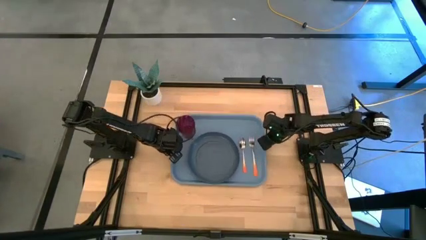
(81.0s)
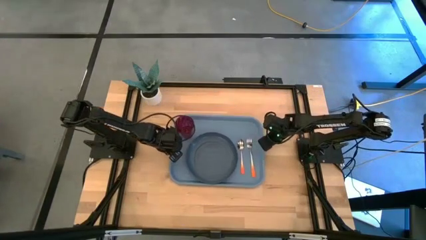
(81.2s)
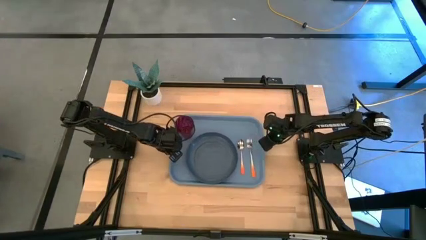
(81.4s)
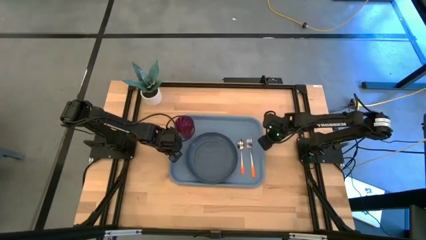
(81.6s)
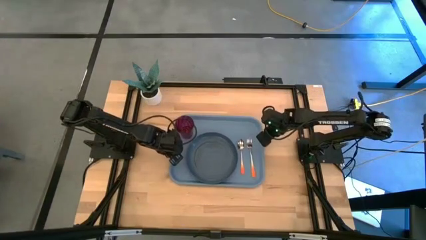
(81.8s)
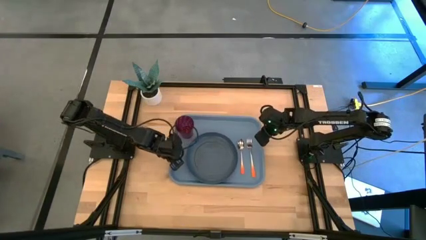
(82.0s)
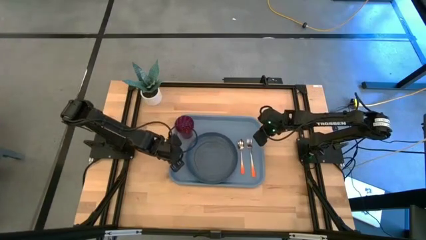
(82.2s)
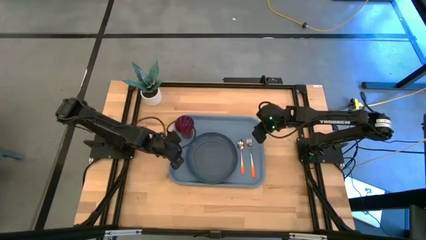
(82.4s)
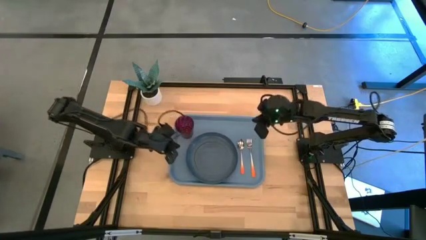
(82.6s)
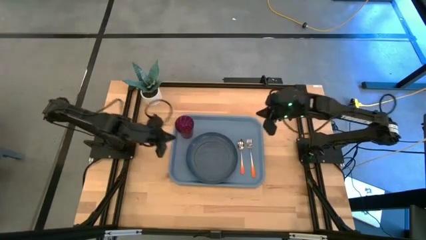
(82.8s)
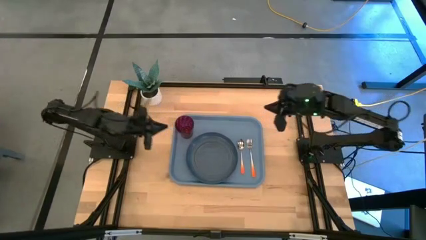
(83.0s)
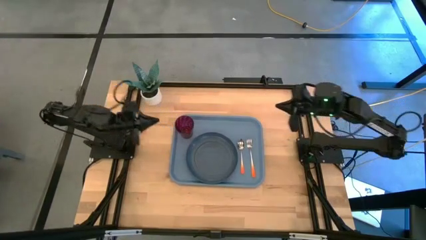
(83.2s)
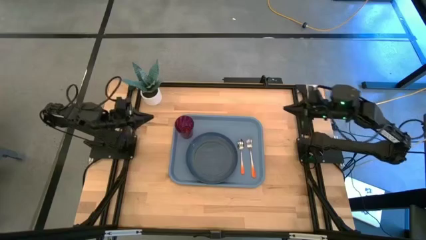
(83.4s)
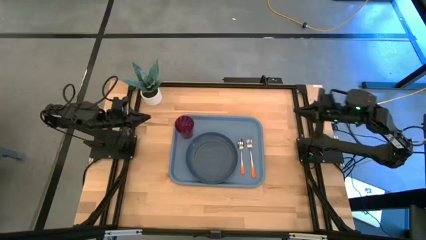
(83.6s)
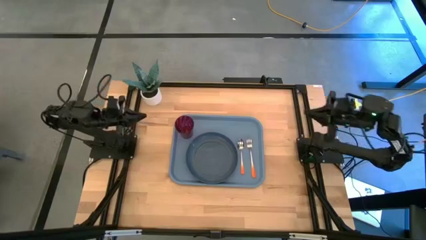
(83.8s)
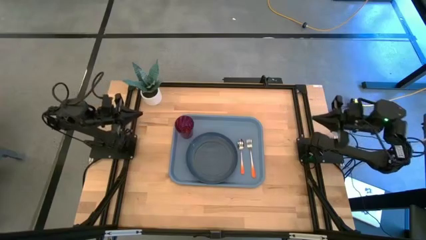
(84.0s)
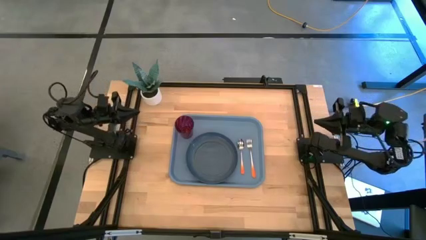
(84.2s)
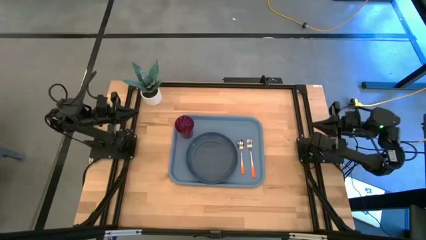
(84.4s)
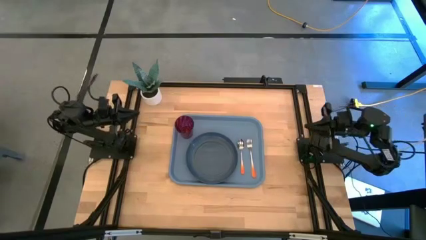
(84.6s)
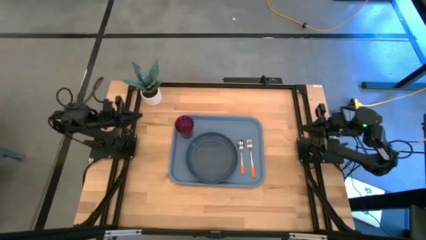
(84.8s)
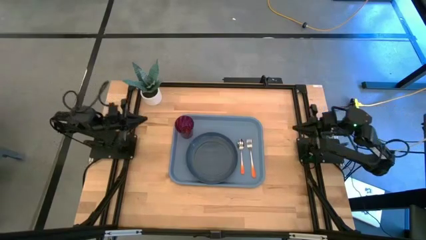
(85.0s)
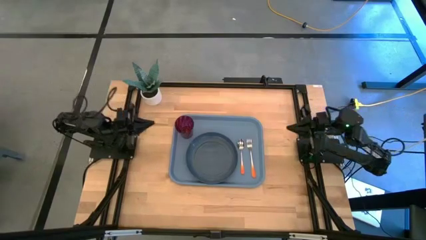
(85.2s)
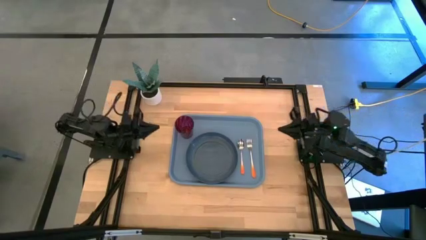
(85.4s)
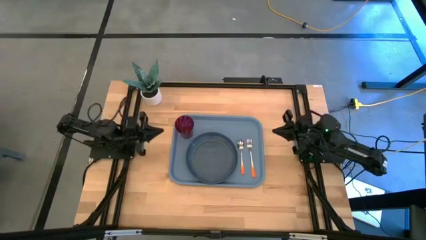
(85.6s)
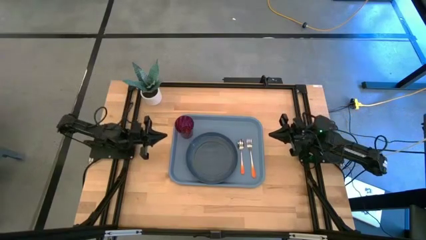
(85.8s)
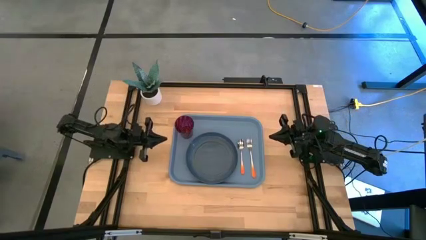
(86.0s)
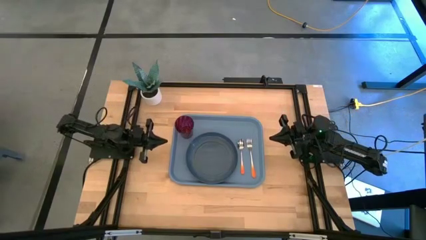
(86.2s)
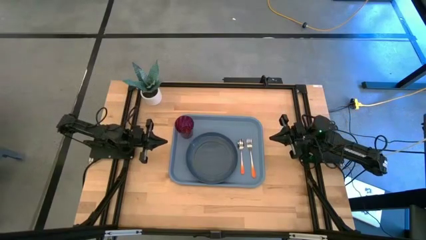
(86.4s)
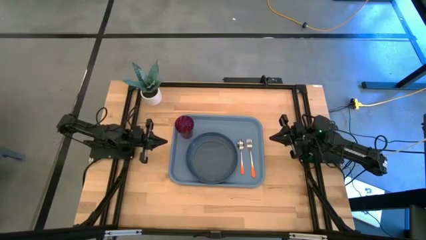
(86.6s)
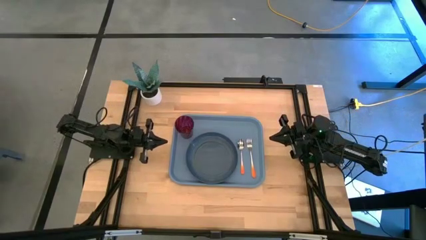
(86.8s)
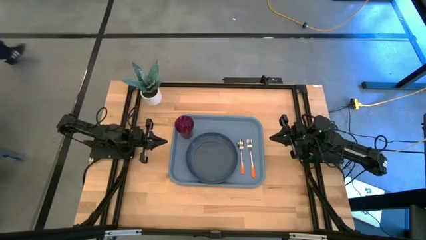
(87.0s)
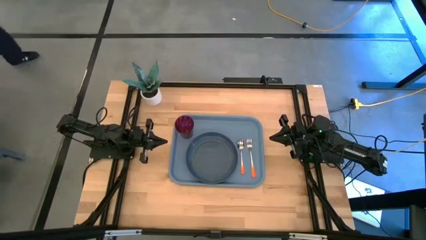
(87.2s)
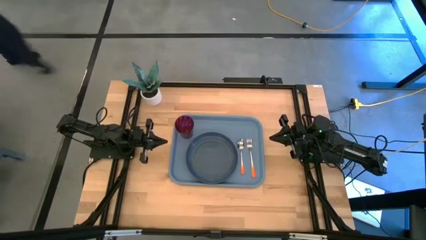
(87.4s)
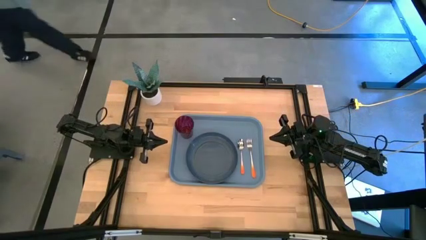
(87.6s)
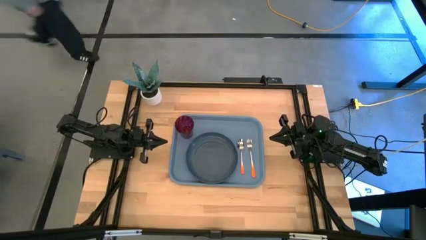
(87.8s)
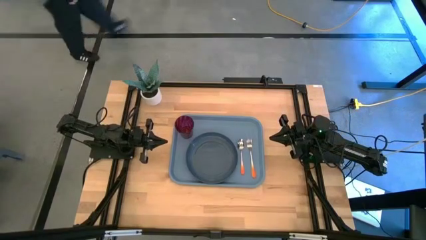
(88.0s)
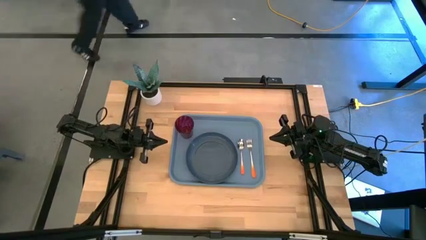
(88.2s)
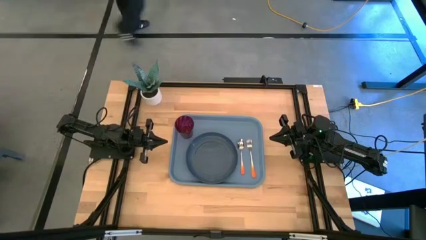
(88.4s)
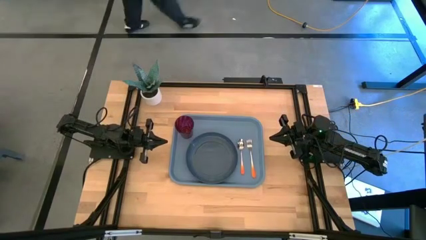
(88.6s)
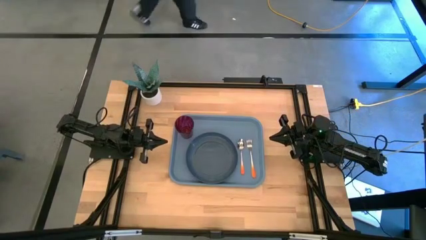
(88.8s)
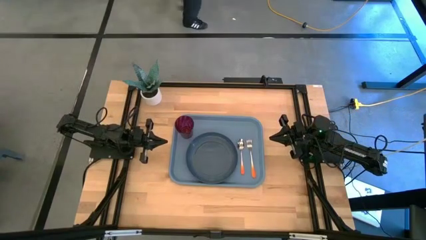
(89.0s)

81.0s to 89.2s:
Task: Pick and place plate/cup/fork/spoon on tray
Return to Home Position

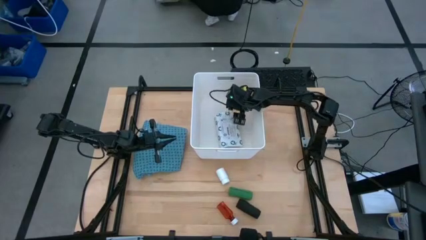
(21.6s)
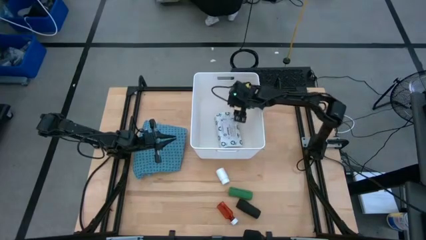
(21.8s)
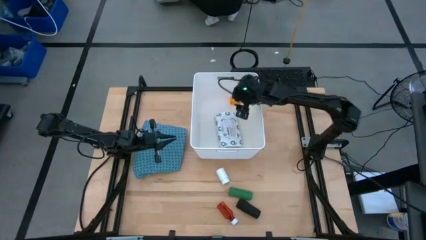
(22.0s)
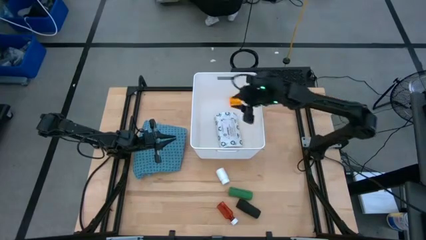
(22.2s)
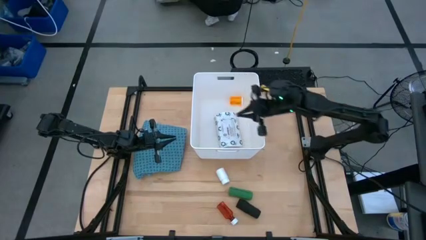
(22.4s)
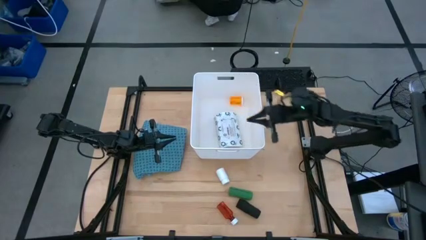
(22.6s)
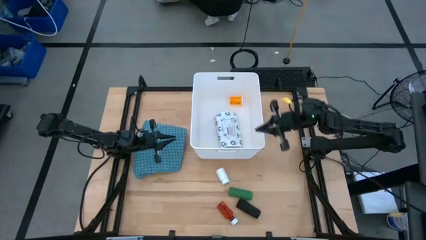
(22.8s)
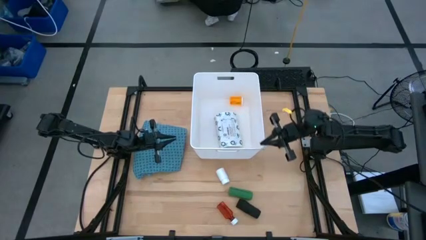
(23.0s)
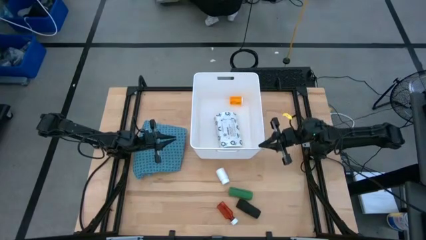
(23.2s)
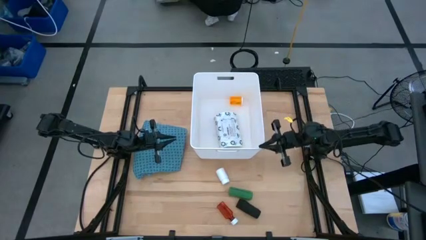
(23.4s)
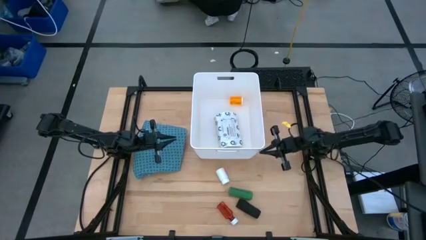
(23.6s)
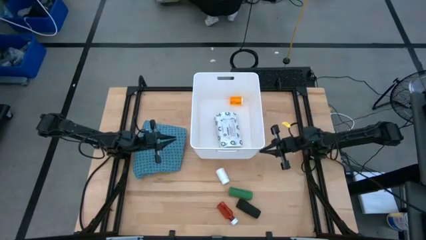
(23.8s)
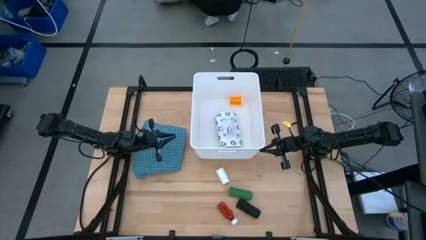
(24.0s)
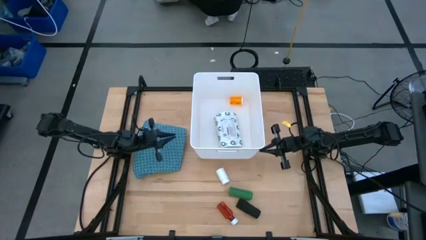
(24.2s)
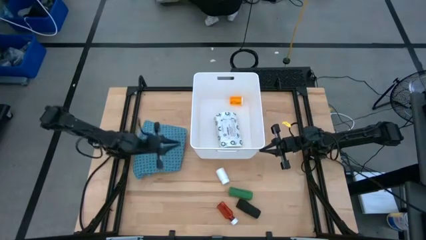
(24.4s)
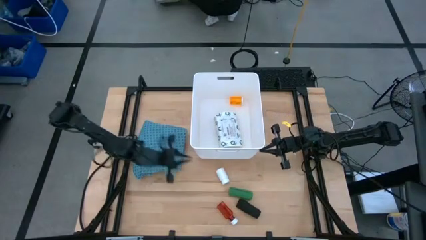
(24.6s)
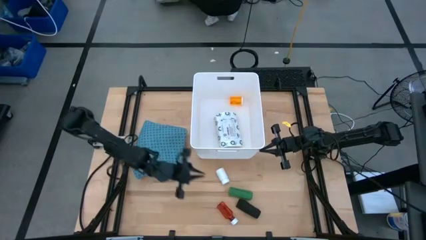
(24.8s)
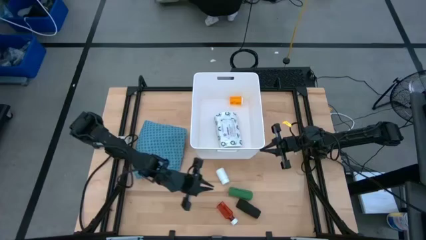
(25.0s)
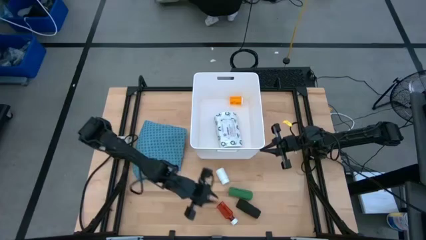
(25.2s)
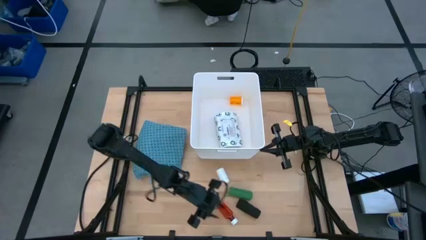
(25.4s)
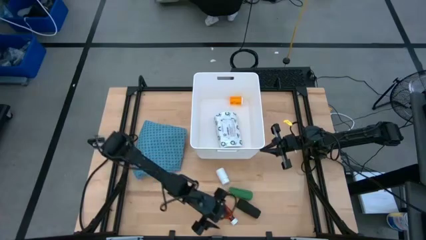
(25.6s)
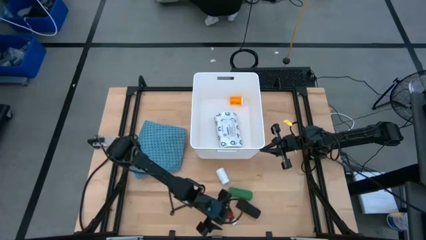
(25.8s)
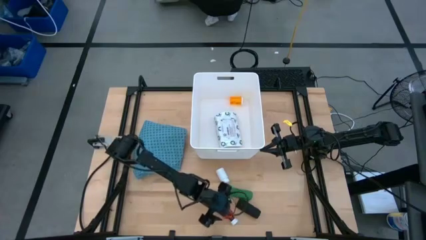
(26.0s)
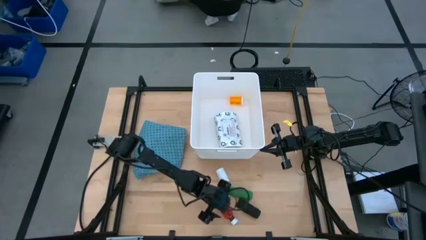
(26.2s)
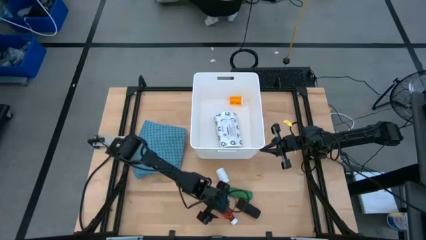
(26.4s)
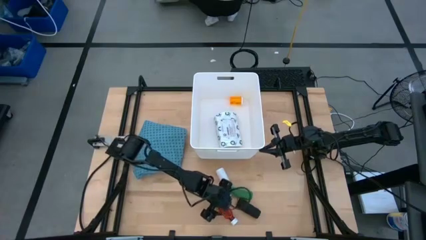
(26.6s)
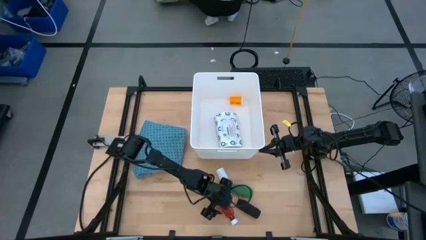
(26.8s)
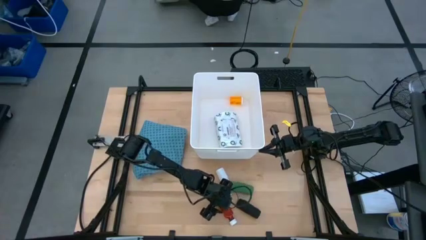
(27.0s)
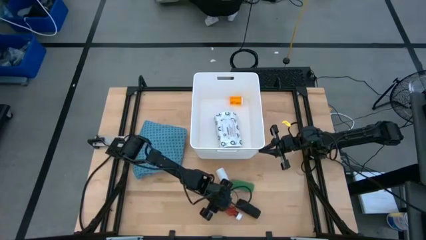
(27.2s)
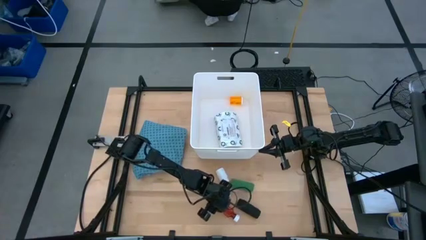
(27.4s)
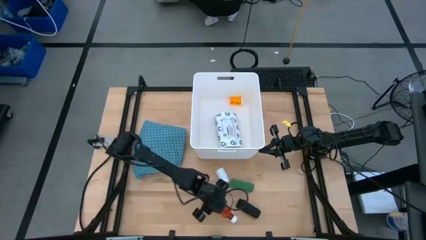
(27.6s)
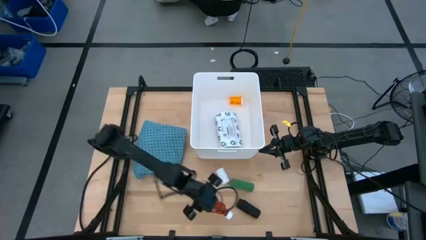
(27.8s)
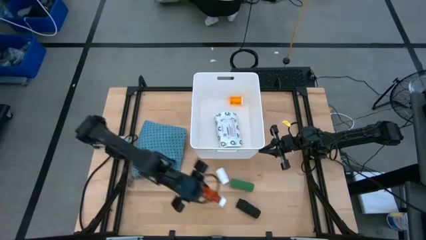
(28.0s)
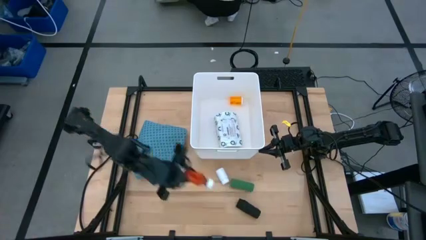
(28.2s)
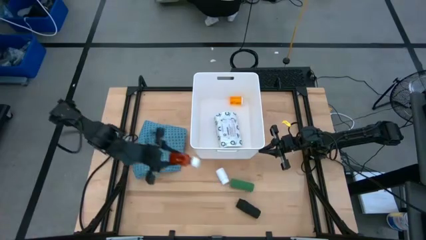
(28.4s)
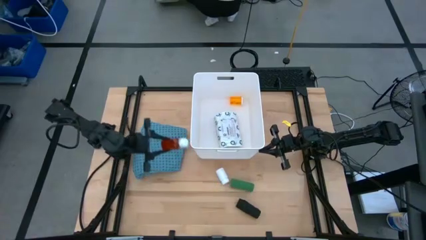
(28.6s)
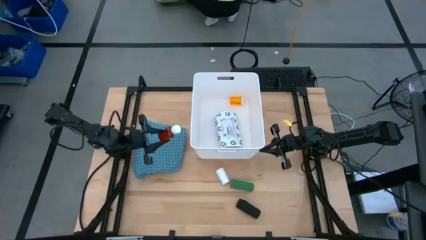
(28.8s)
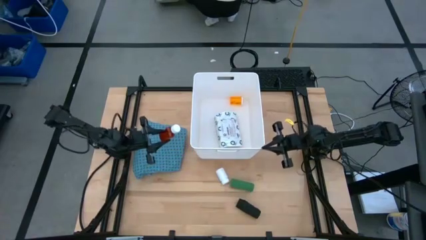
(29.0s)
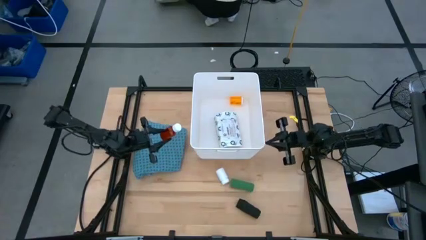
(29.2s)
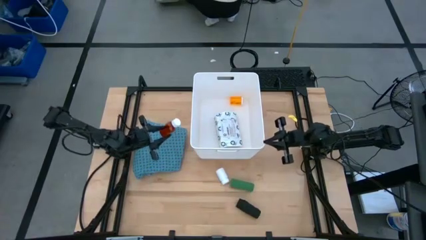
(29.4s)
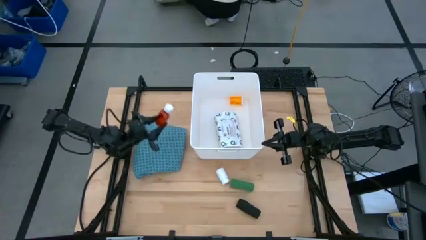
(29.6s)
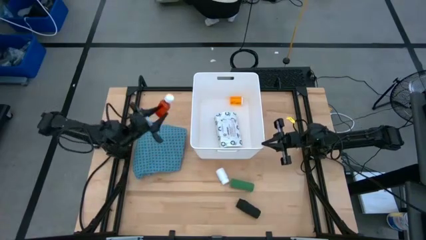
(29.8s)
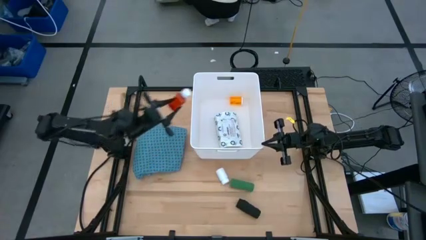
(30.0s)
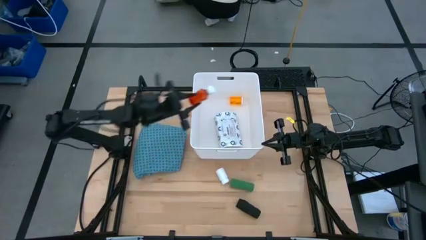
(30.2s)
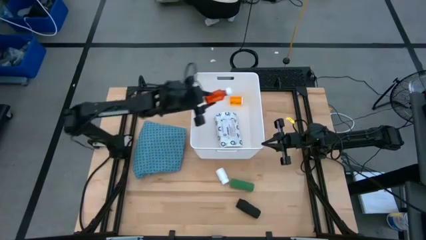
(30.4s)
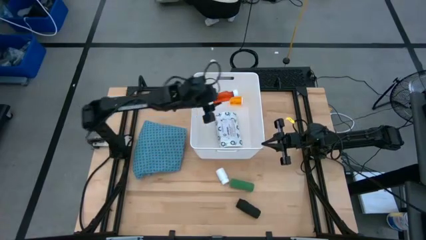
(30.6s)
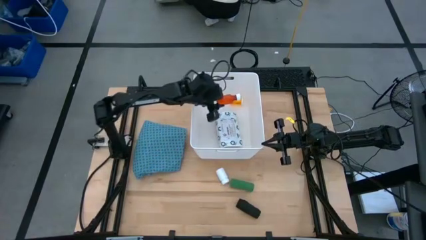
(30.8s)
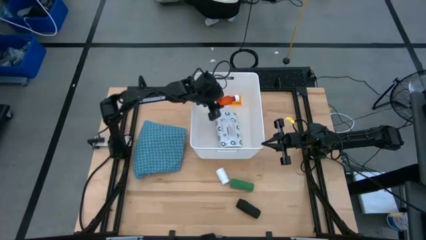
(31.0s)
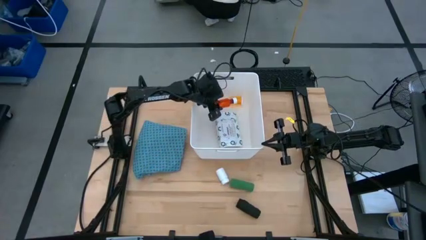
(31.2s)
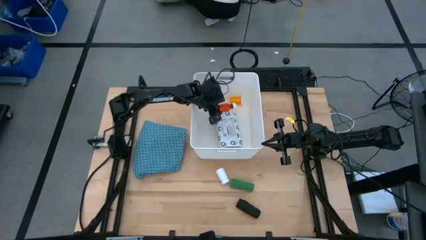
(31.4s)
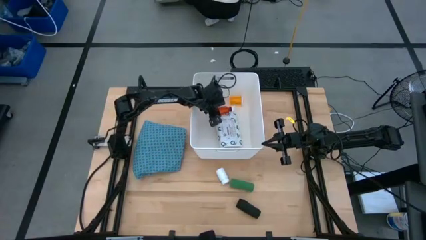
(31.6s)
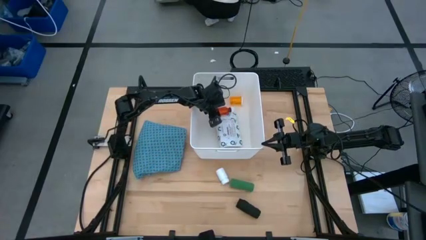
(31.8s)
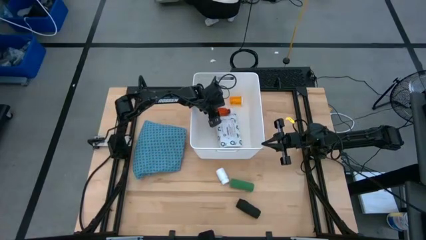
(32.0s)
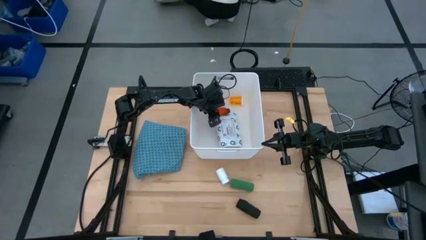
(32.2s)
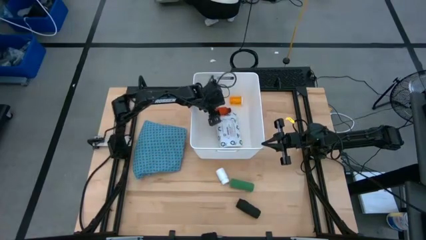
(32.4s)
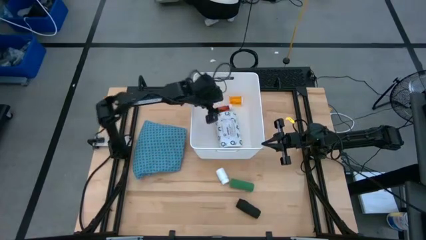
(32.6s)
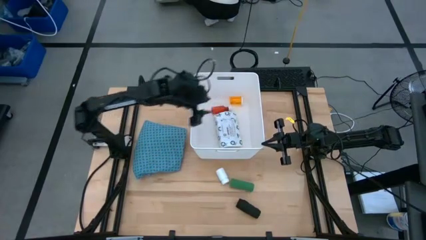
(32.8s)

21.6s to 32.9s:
Task: Pick & place medical supplies in basket/bin
Put the dark orange pill bottle into the white bin
